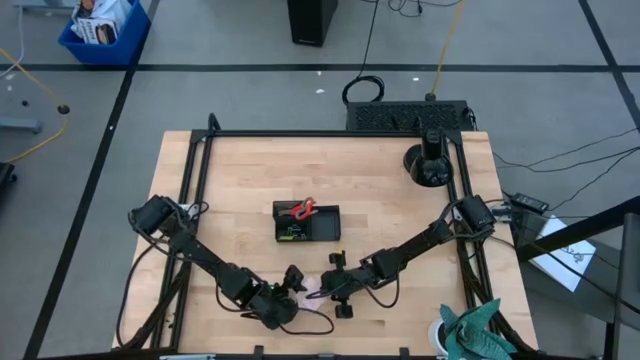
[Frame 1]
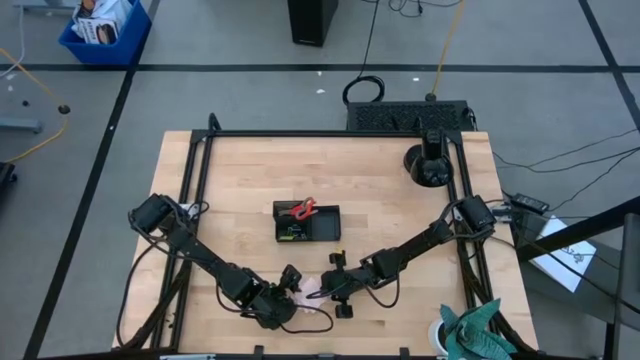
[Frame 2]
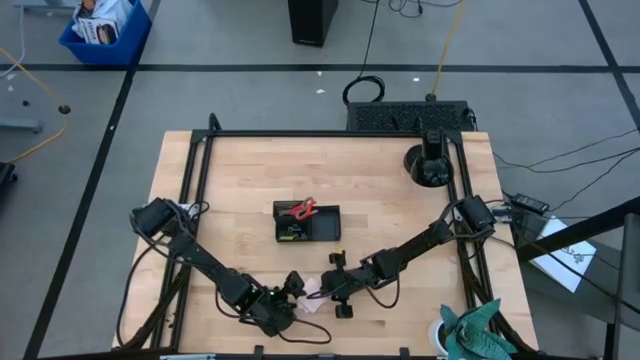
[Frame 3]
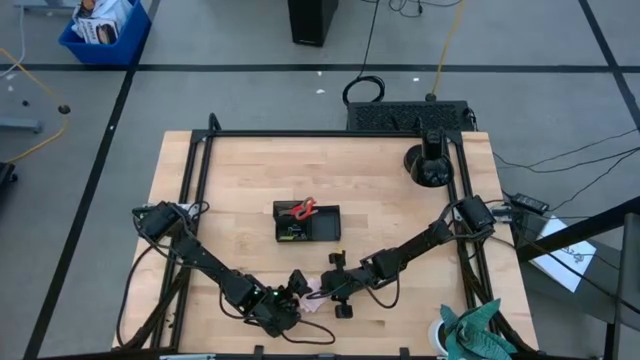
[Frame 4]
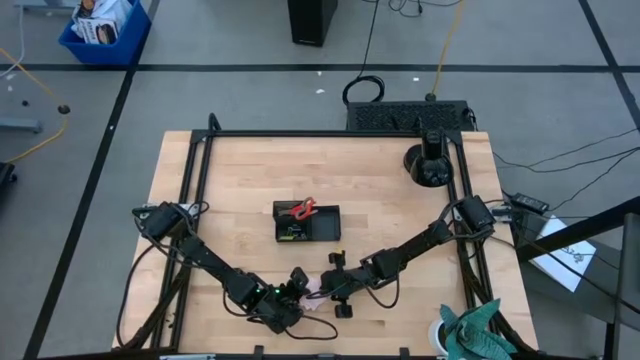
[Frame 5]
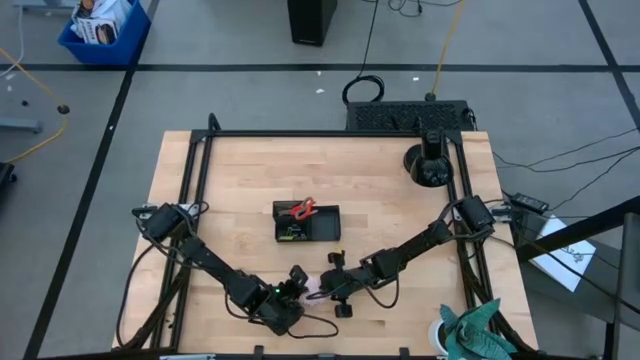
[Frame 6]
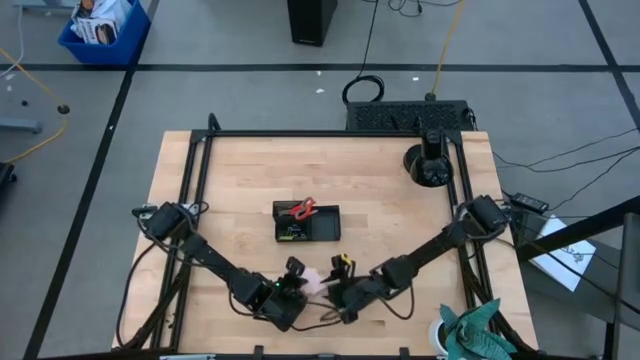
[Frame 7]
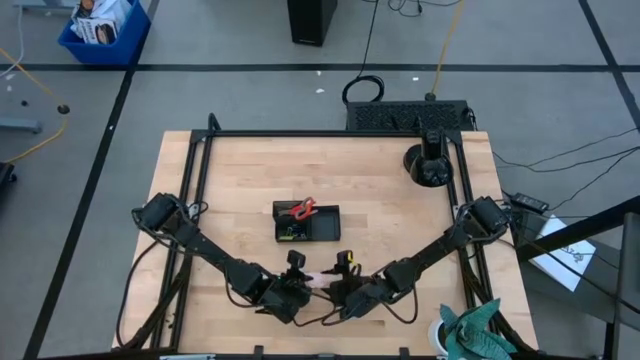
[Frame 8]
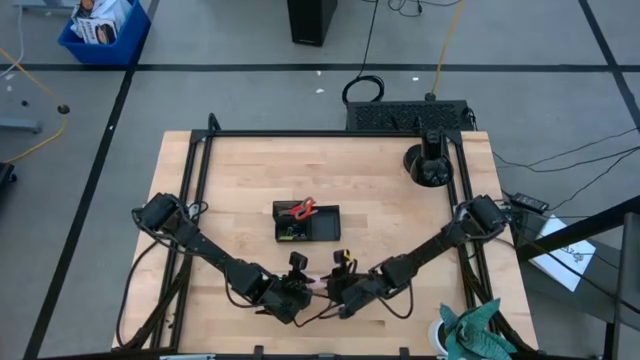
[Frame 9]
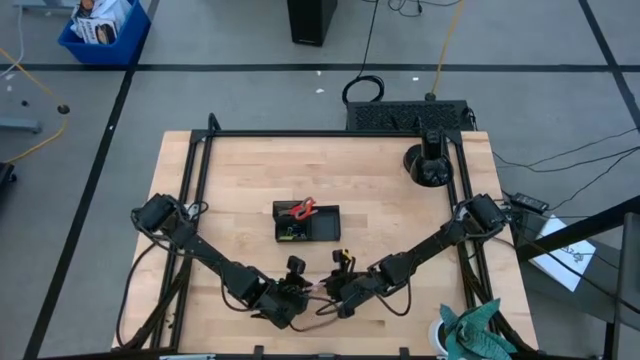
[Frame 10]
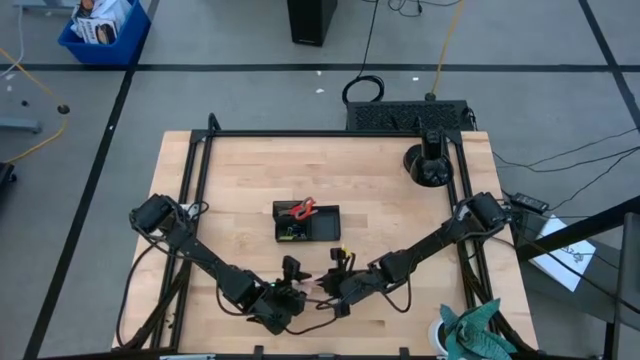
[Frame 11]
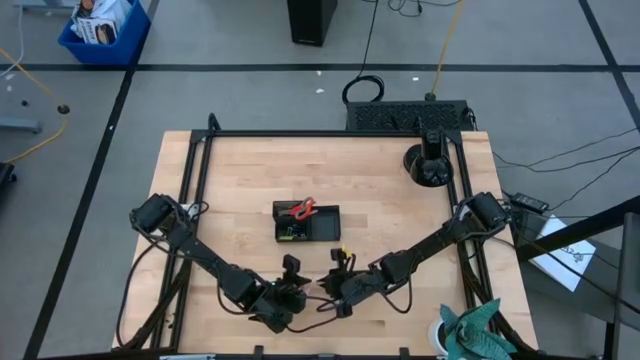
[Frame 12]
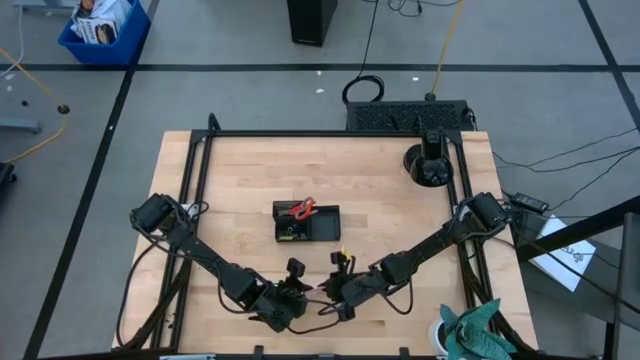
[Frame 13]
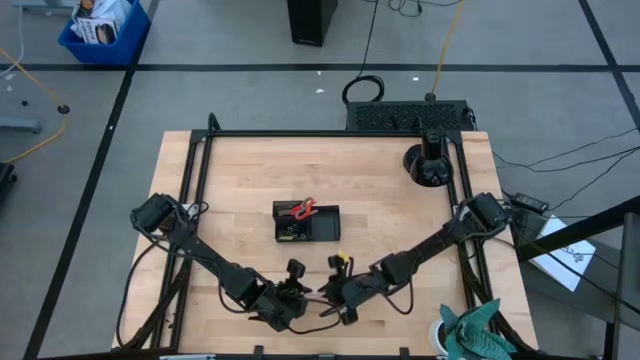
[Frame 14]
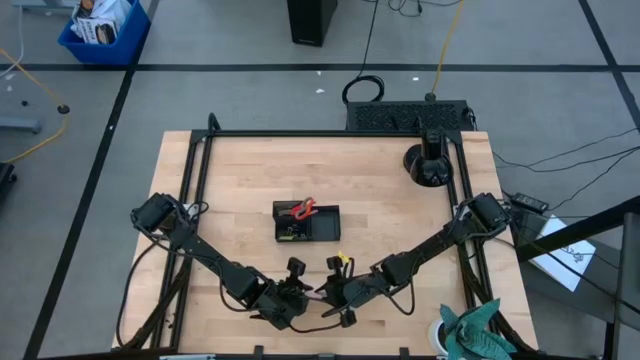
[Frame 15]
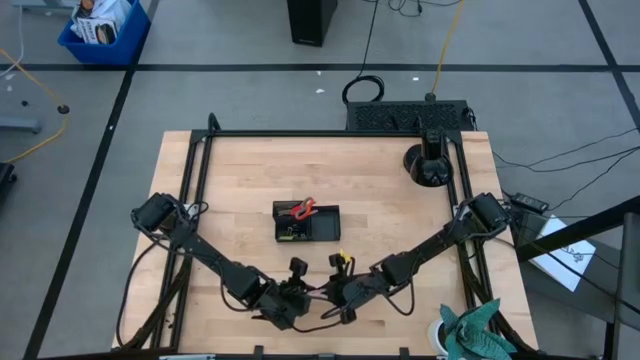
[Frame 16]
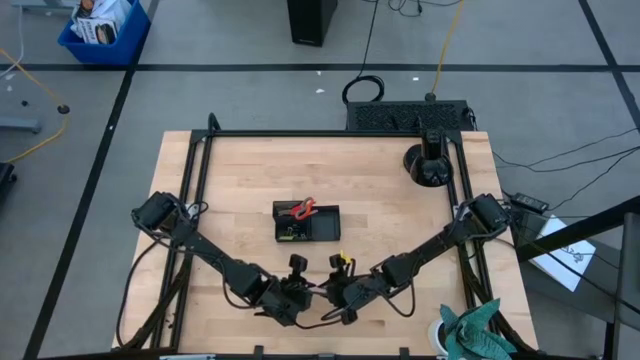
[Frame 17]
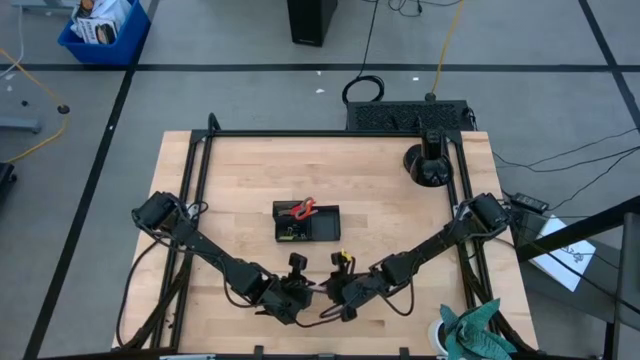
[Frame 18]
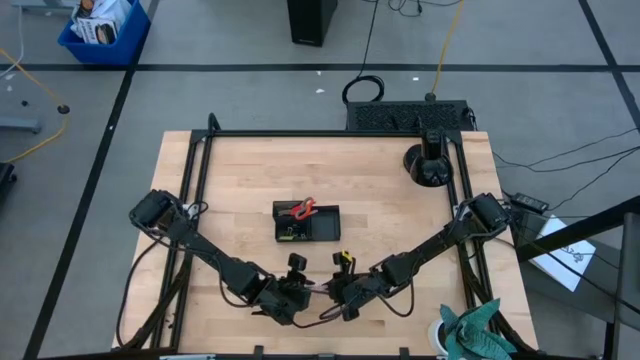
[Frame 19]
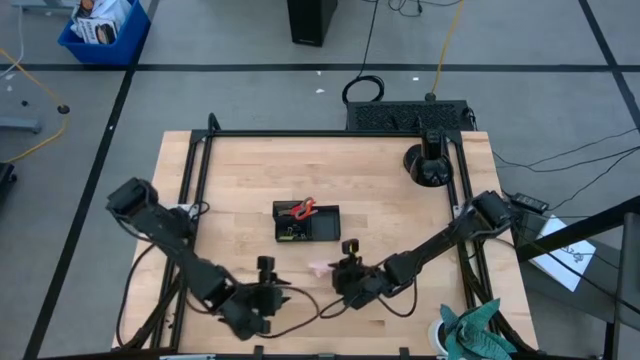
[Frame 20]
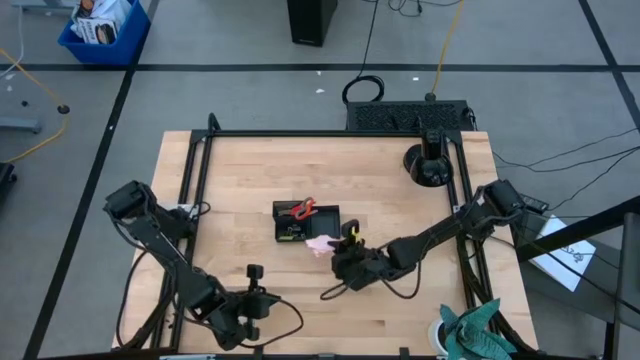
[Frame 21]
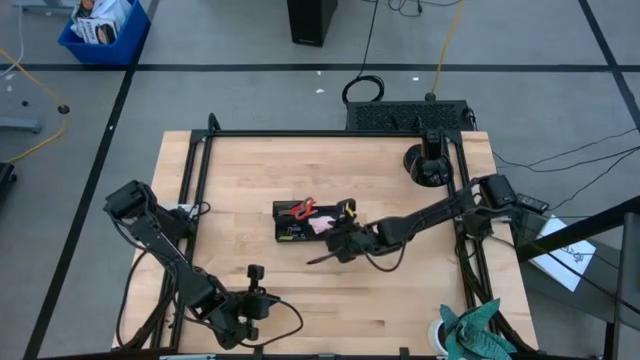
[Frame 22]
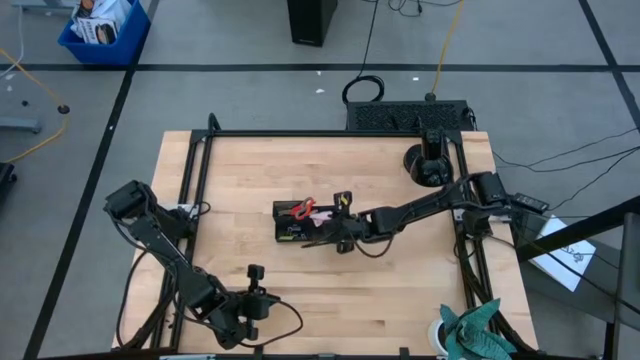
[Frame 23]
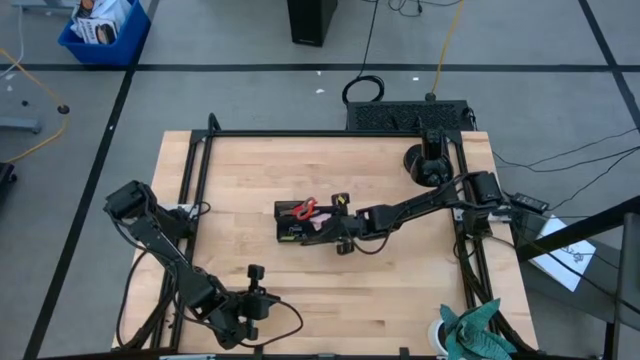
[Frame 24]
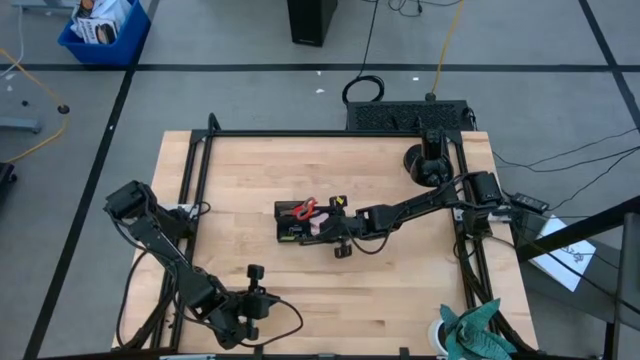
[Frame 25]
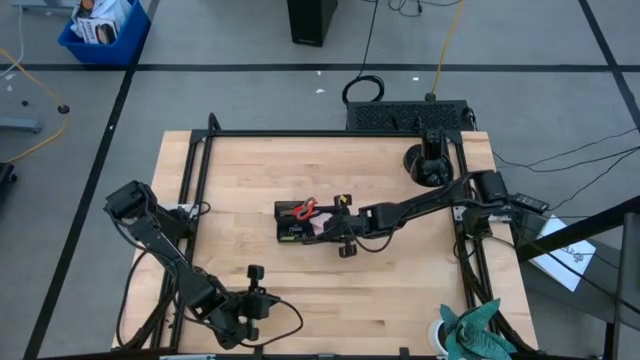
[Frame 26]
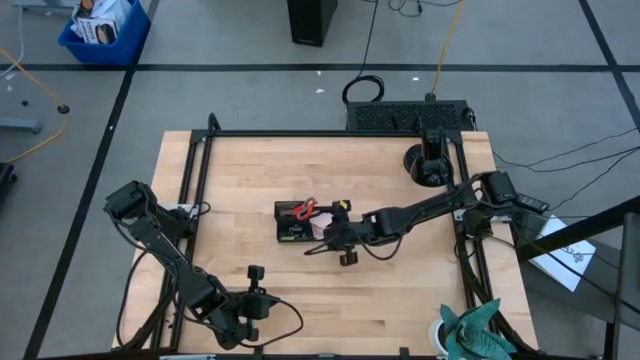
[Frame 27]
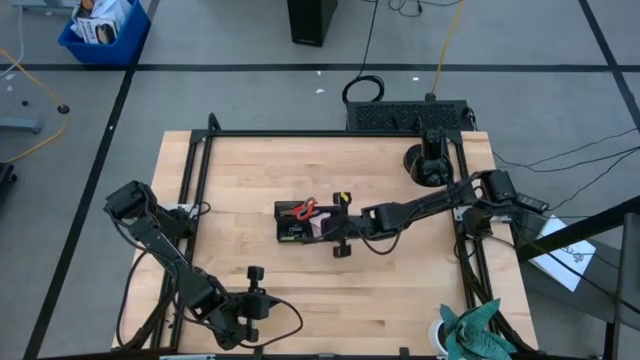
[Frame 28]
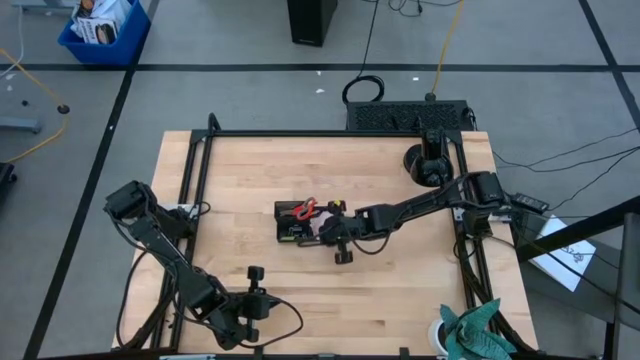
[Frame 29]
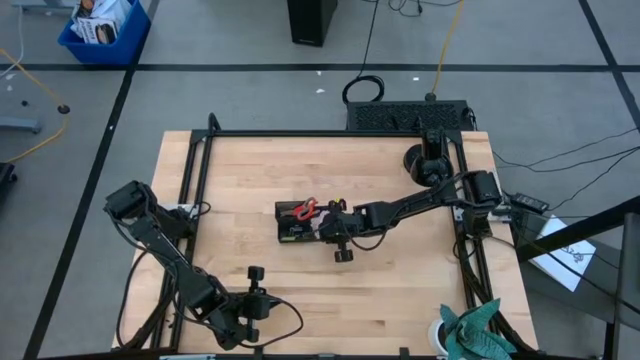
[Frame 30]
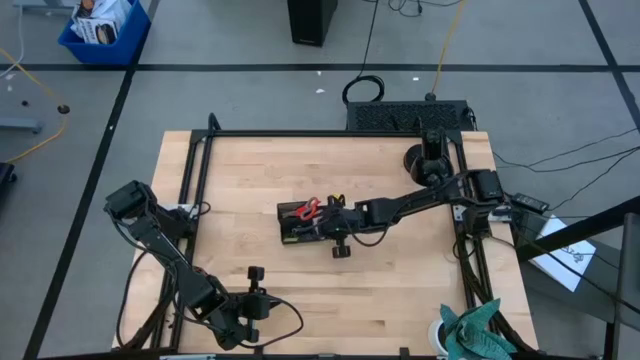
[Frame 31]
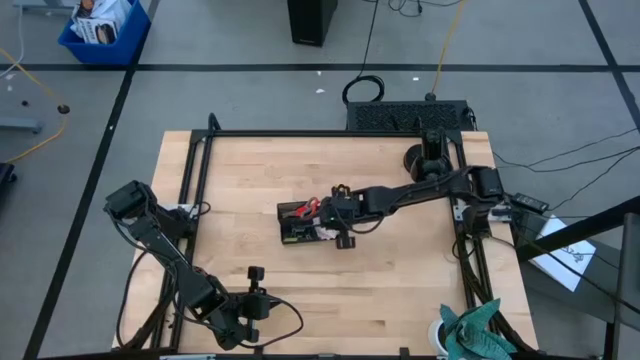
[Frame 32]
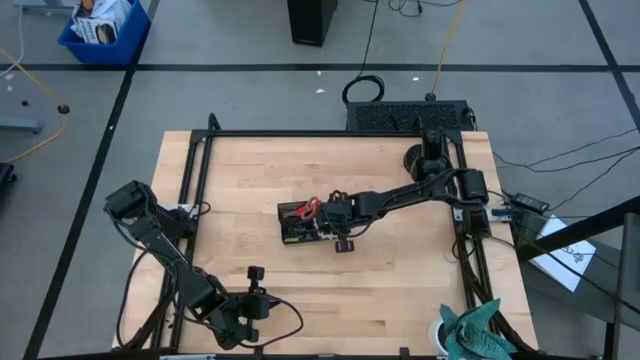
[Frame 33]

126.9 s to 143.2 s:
Task: Pick and place office supplies into organizer
Put the pink sticky notes into the black desk organizer

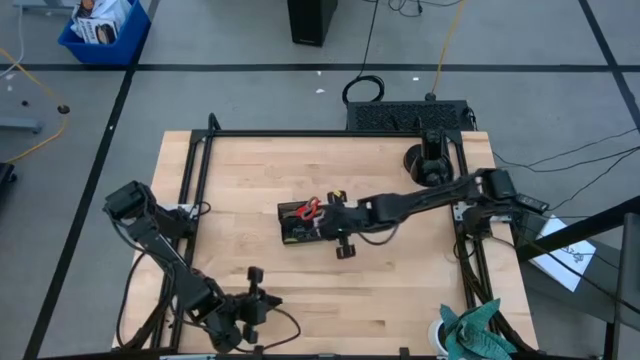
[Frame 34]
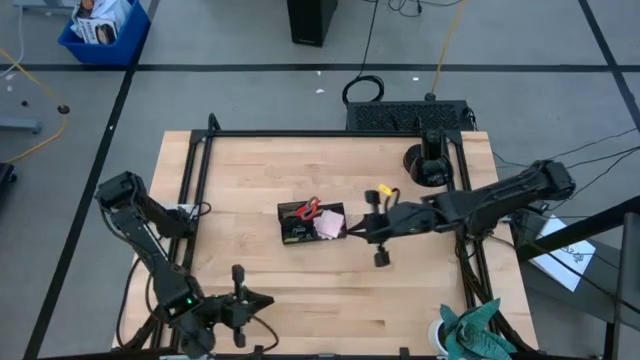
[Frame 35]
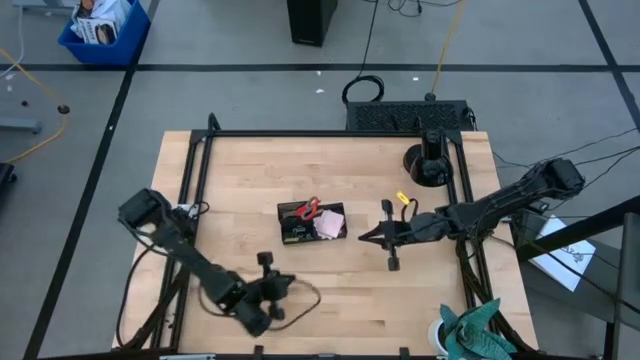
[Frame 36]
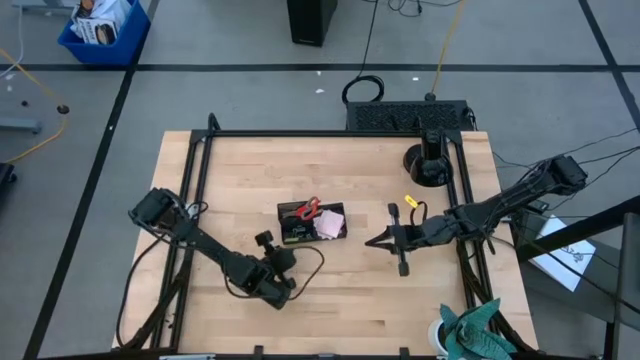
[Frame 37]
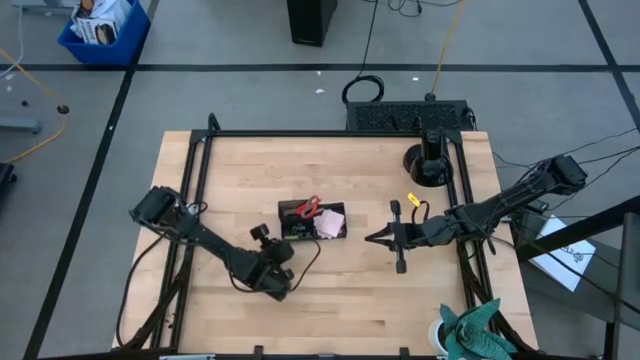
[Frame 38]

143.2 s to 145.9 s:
Adjust the black desk organizer on the table

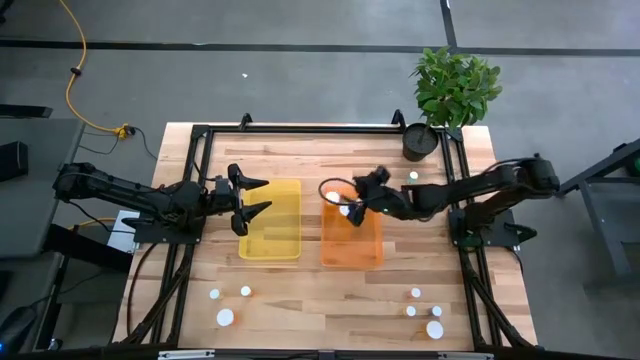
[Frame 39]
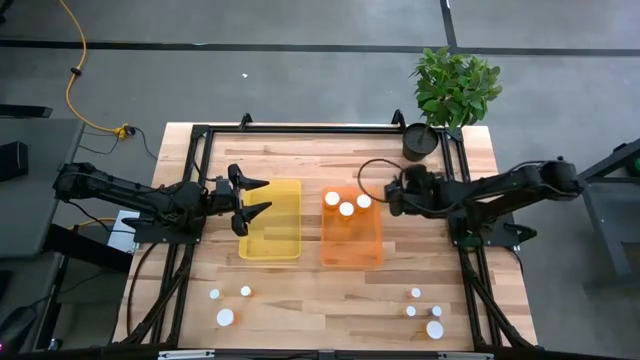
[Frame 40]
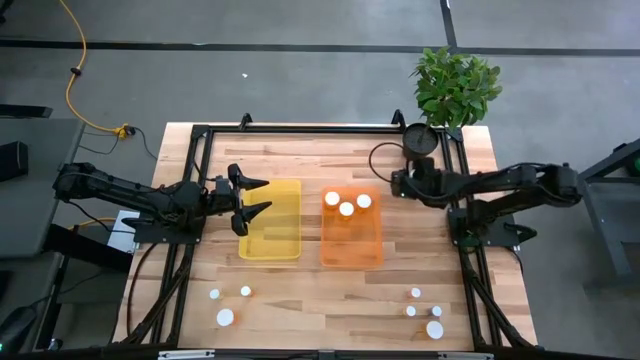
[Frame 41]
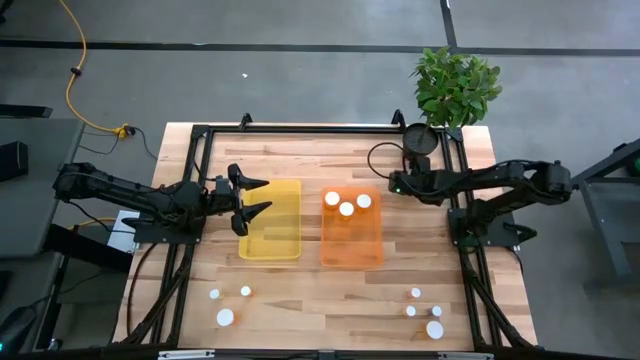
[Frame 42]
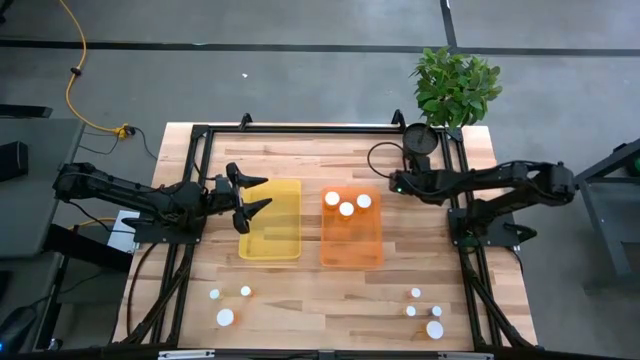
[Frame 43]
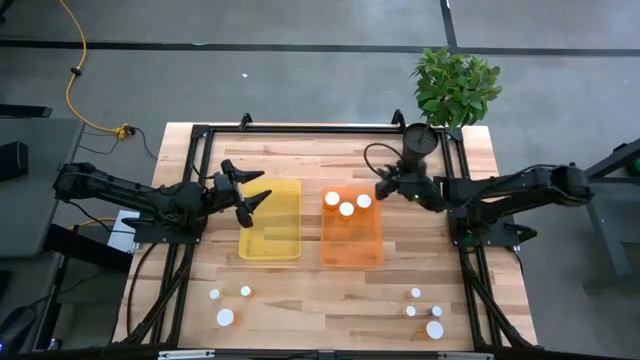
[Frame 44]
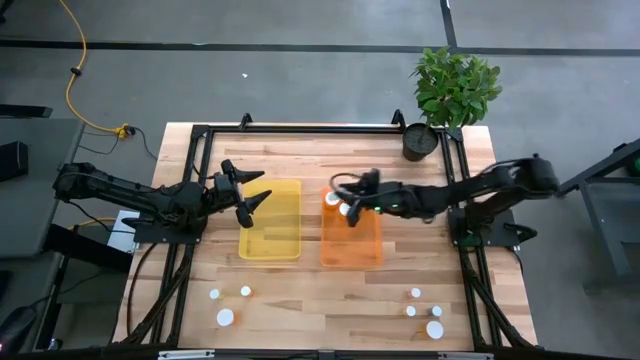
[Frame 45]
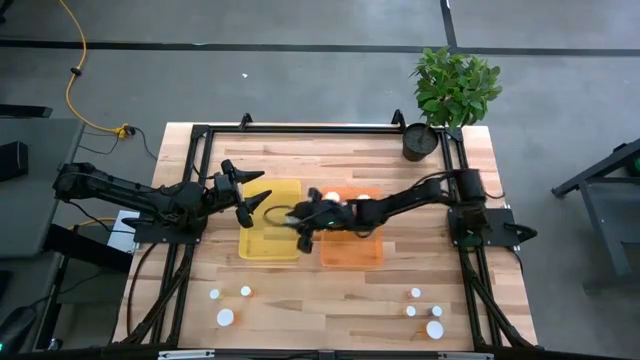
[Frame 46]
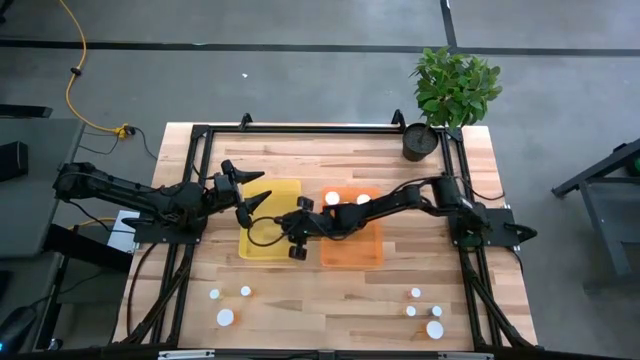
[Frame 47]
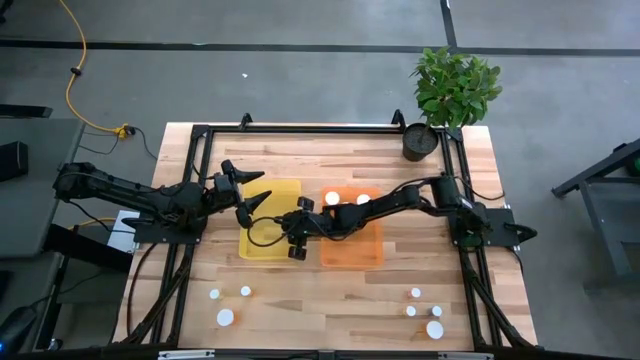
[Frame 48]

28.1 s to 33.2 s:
Task: Pick and place medicine bottles into bin by pill shape (circle, oval)
Put the blue tablet bottle into the yellow bin
